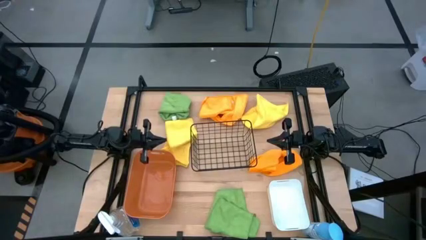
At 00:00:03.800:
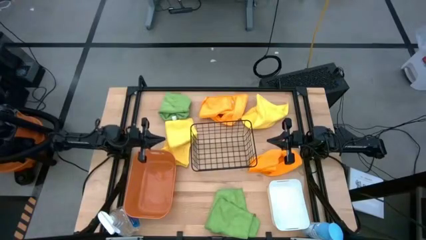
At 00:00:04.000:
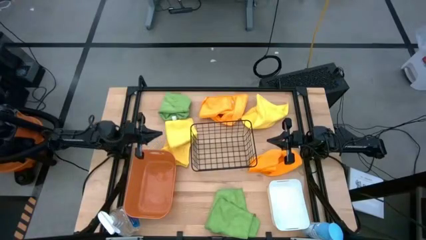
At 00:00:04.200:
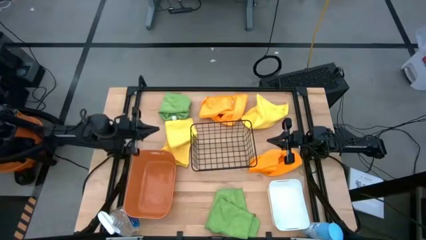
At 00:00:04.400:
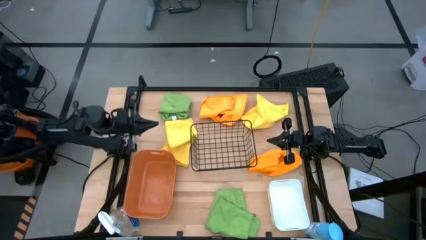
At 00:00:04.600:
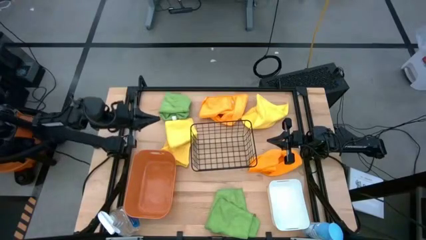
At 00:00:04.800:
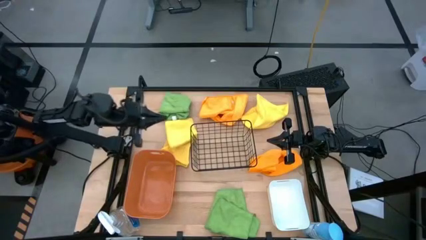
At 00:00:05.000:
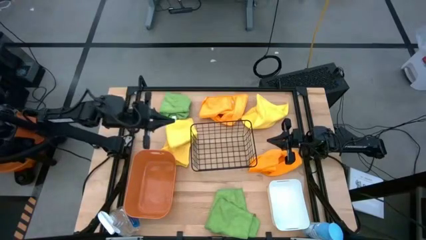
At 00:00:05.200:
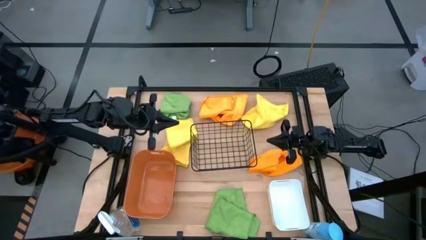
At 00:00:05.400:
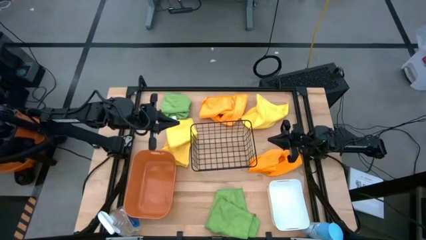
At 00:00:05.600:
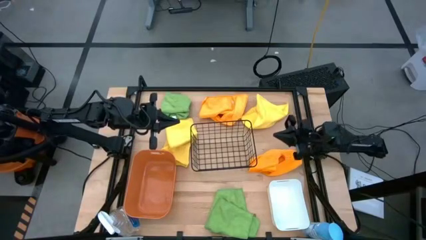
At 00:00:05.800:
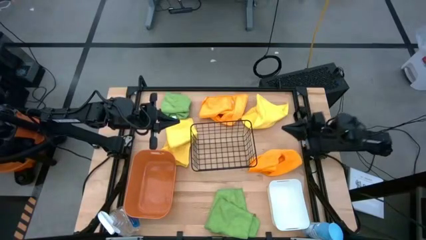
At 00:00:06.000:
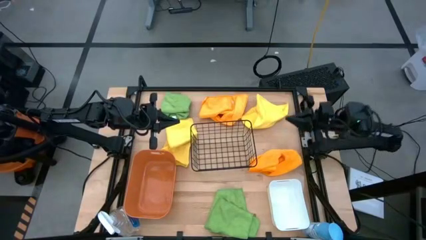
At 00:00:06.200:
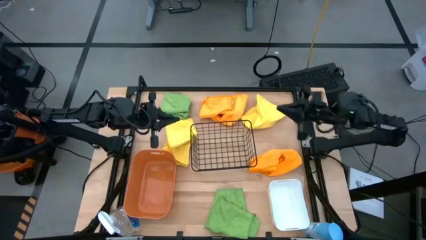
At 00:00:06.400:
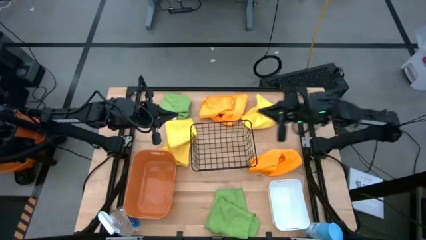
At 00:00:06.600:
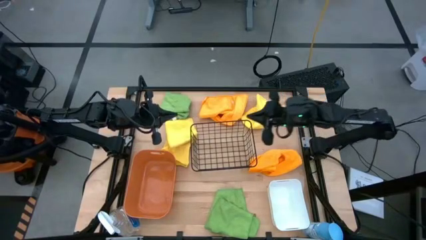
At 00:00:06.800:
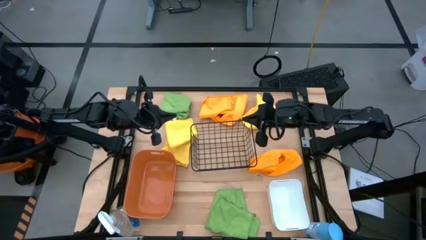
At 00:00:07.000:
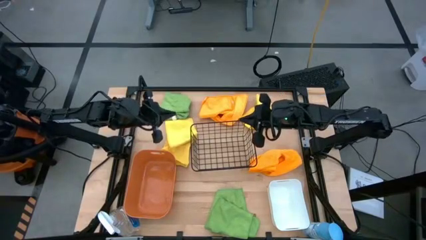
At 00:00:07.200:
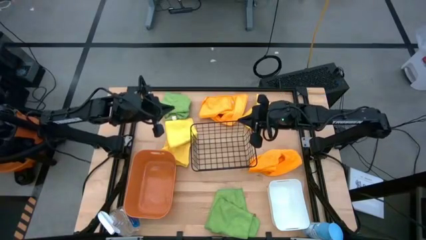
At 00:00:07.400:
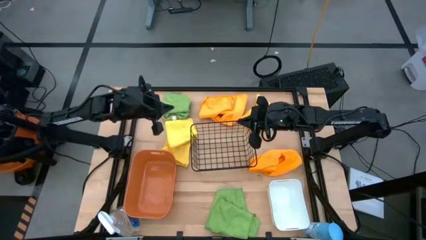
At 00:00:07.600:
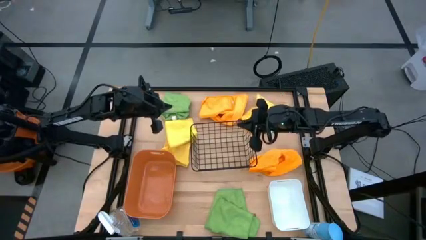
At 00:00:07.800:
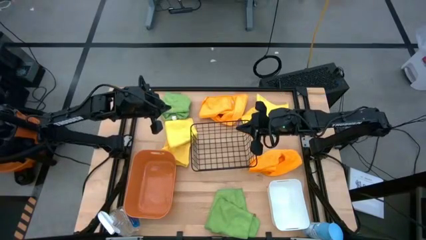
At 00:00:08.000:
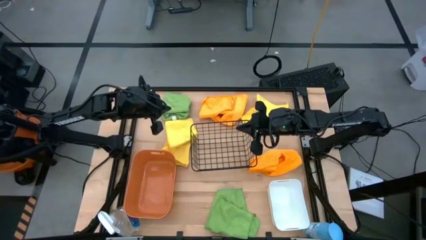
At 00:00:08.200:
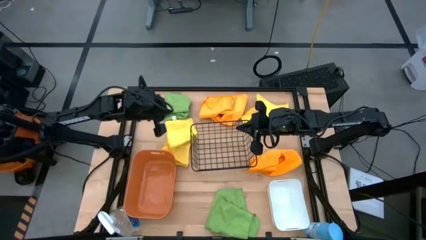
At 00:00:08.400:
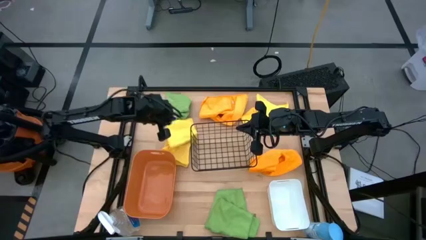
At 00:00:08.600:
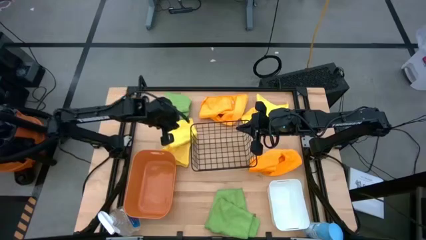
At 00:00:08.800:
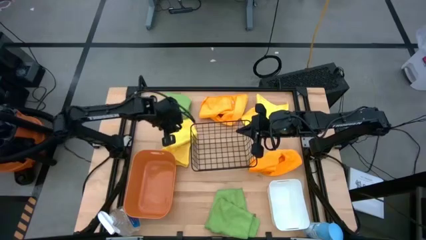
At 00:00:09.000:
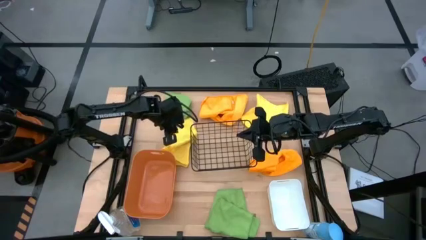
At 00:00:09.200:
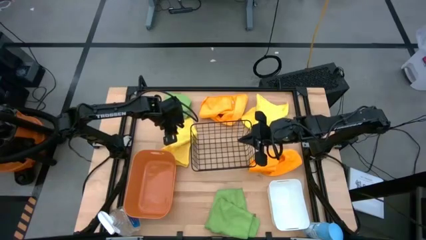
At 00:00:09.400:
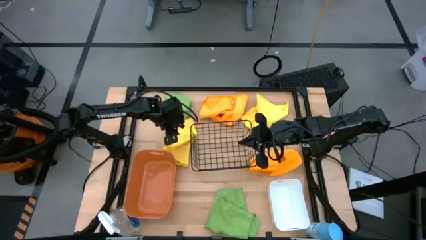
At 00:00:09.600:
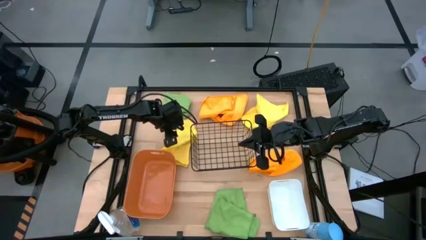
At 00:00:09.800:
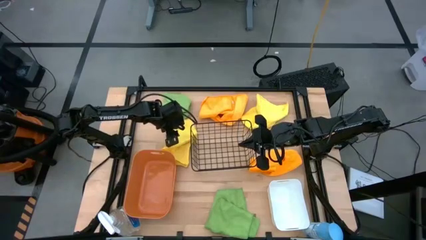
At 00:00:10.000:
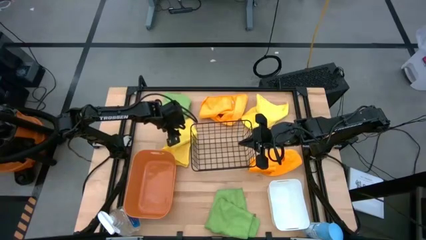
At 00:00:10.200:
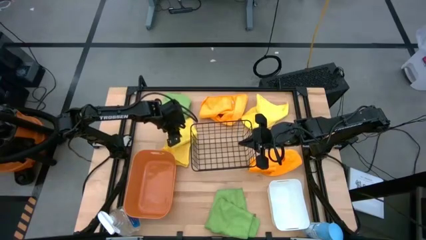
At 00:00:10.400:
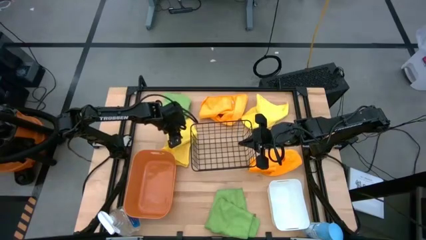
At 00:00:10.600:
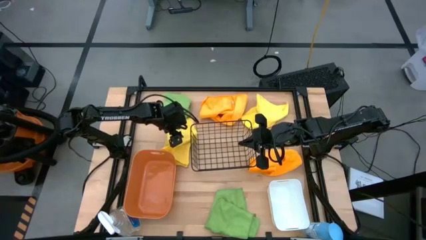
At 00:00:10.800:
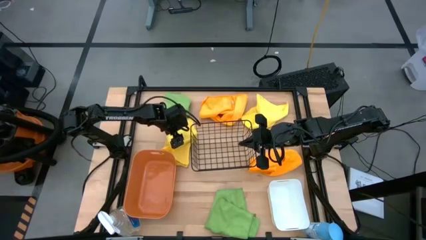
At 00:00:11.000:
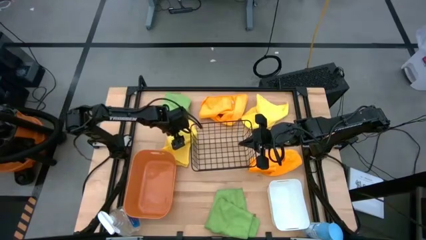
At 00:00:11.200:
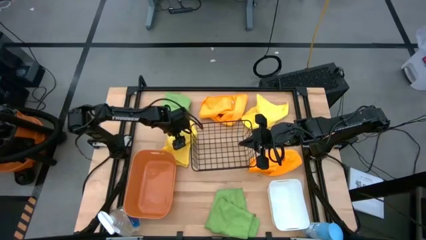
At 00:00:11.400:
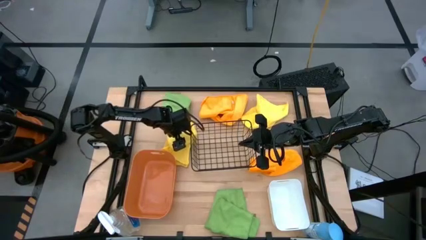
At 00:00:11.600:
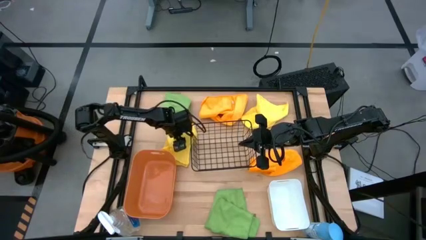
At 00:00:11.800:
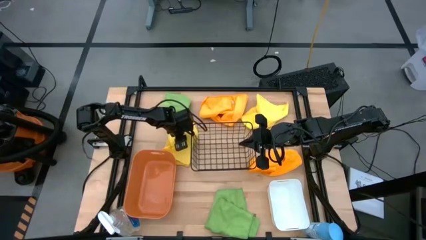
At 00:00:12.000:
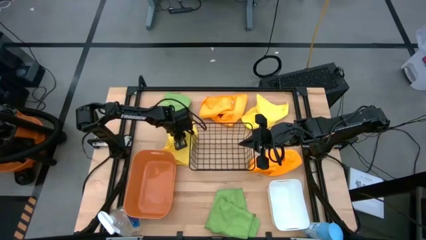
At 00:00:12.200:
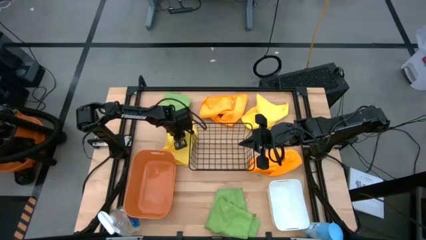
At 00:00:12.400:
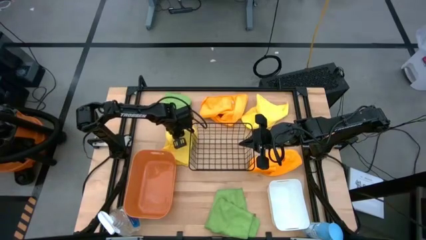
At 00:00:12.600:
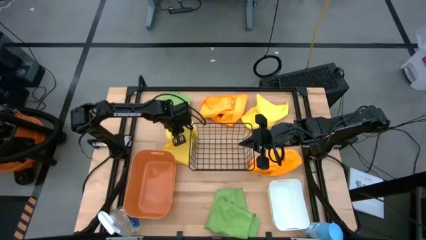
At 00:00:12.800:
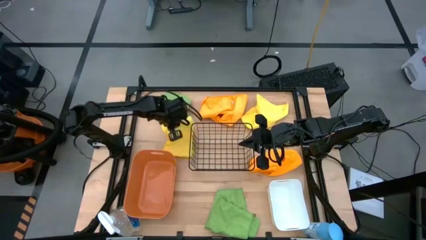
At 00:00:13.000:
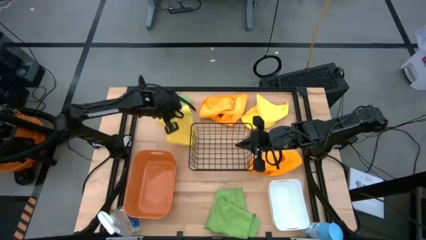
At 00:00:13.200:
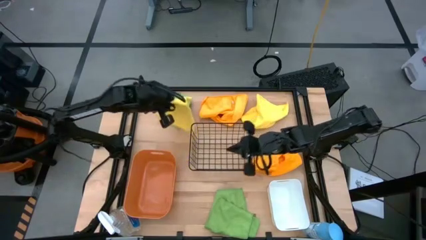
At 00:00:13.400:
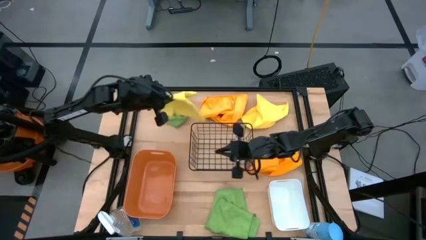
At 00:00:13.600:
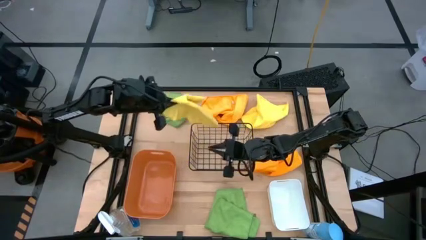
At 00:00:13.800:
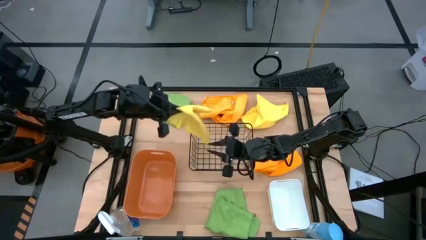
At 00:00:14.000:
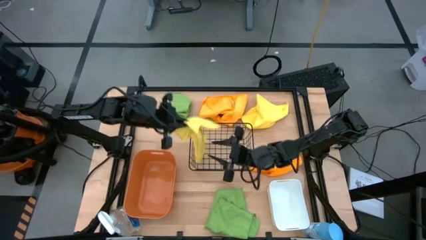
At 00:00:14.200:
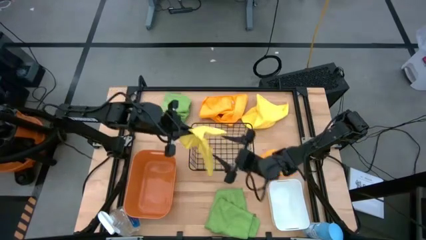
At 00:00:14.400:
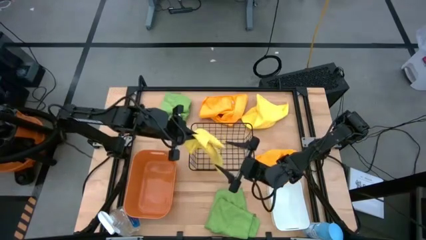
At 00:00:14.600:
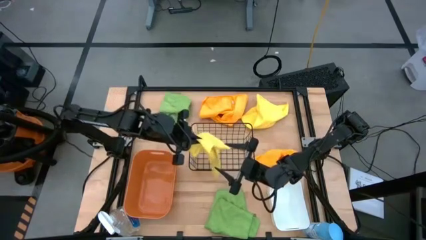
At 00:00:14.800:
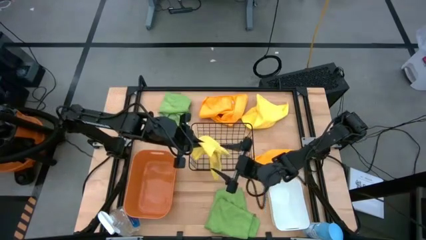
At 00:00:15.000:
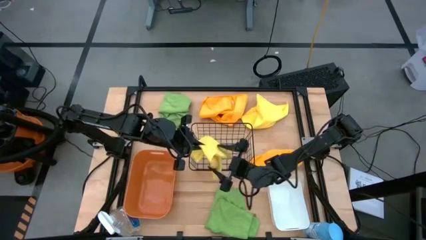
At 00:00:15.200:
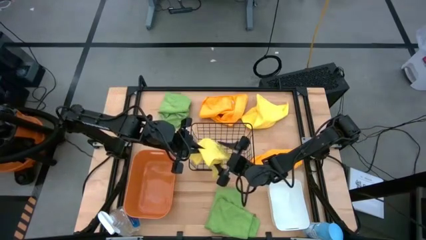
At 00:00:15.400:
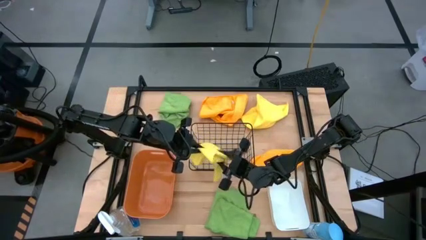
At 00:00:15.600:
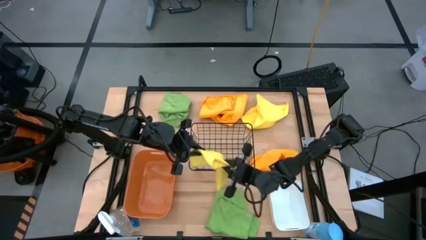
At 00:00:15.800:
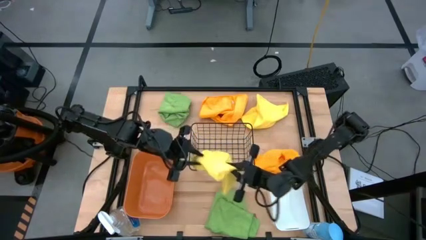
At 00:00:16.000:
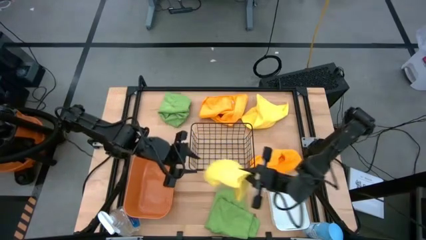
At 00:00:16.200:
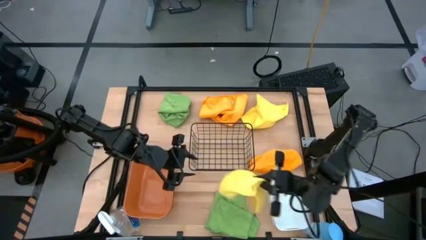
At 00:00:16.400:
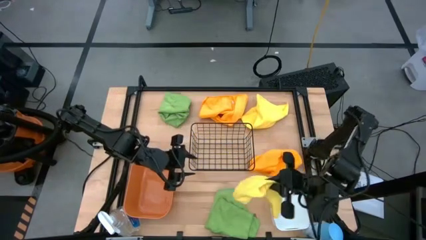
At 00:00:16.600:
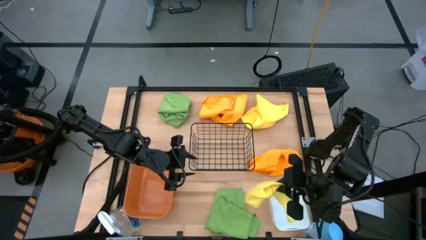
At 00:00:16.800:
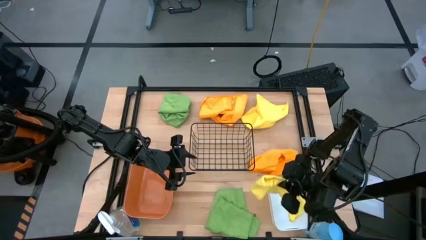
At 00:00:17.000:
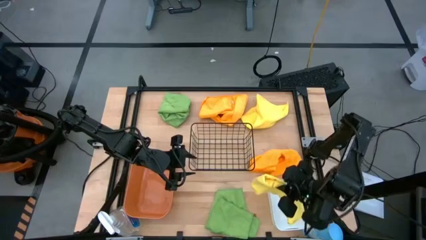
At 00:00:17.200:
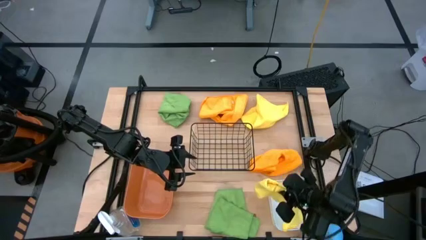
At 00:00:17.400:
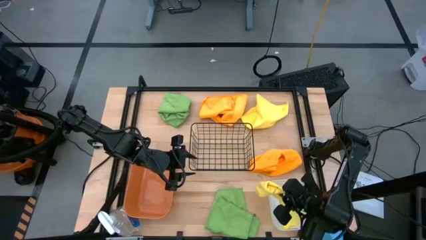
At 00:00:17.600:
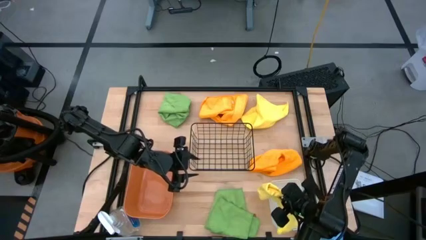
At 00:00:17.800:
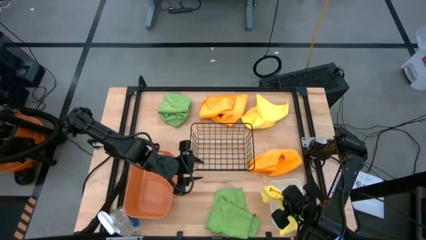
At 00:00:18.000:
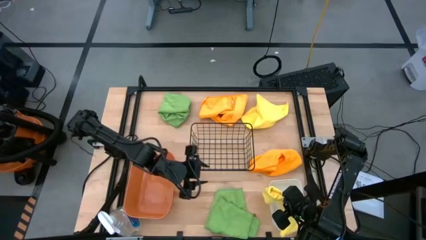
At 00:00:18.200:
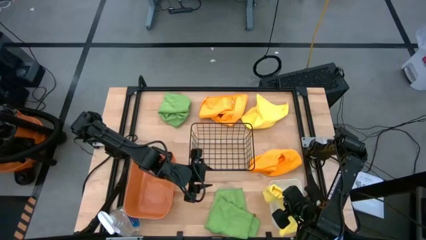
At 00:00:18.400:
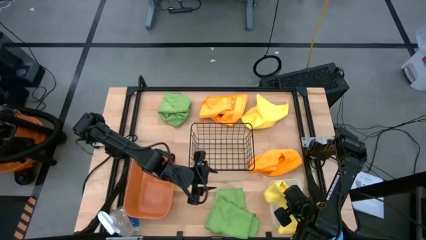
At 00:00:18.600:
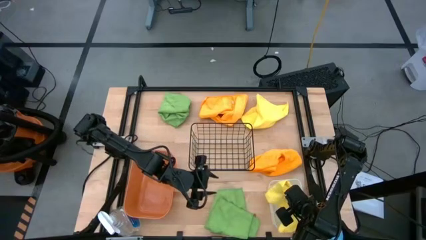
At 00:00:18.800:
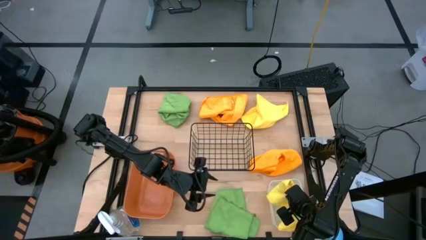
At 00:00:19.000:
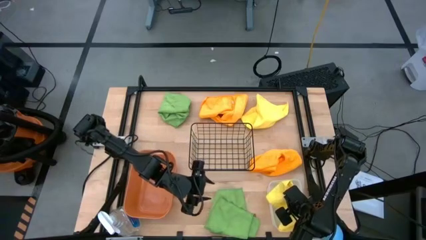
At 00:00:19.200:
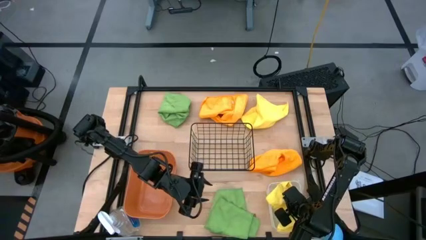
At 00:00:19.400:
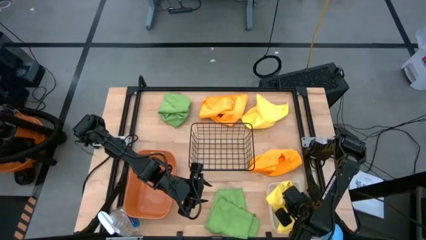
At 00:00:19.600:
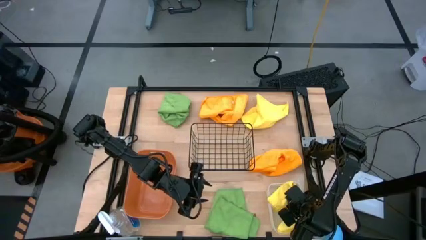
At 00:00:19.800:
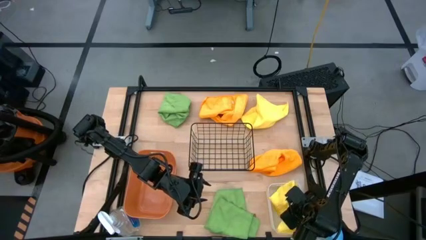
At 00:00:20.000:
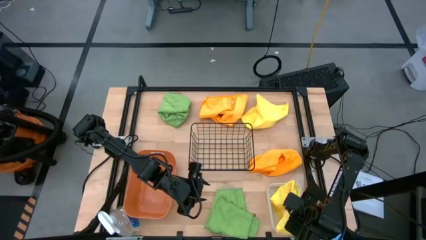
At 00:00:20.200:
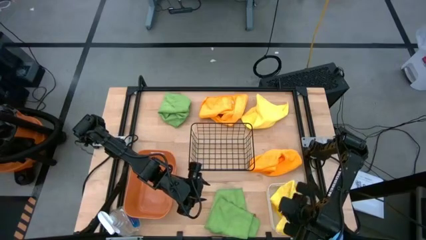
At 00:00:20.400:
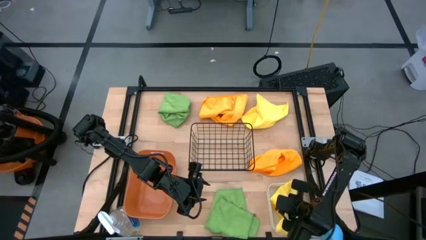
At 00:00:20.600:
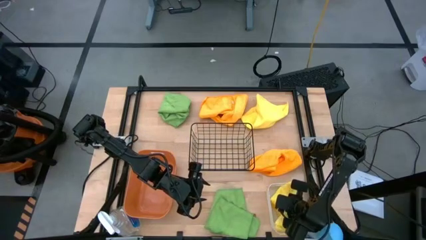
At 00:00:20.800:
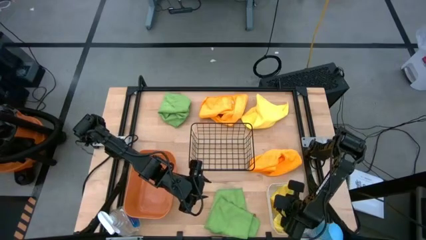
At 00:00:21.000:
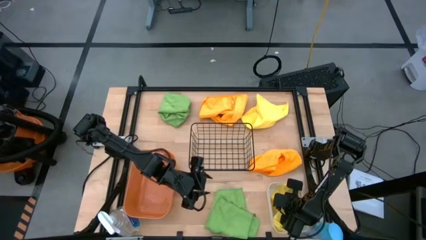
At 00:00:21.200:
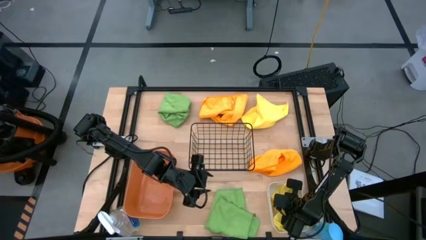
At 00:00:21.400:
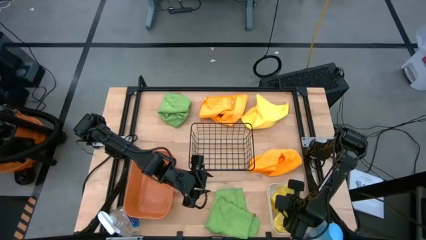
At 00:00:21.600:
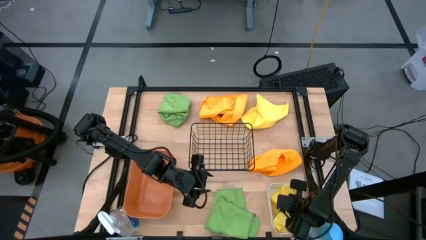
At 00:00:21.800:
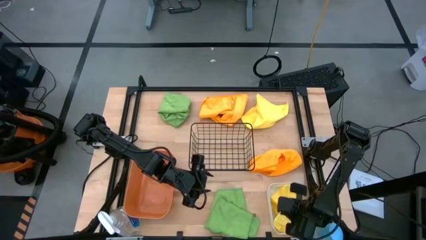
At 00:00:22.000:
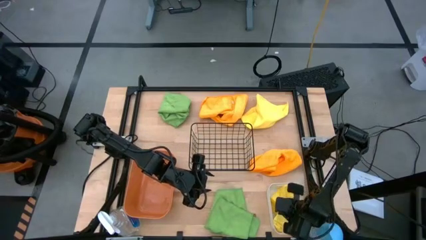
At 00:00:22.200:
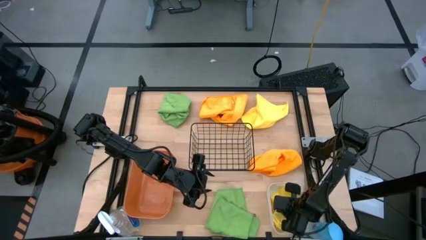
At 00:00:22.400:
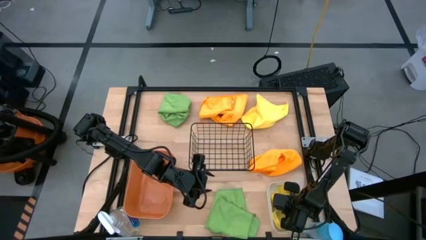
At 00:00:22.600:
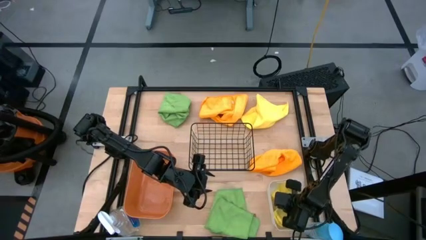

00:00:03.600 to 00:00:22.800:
Task: Sort microfiber towel by color & place in baskets
Put the left yellow microfiber cloth into the white bin
